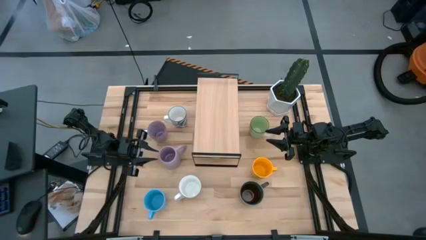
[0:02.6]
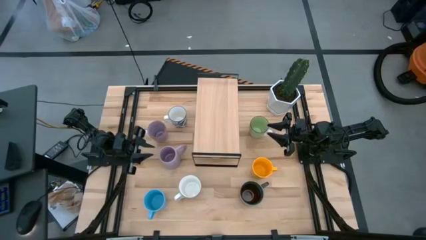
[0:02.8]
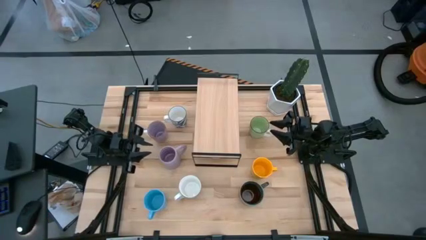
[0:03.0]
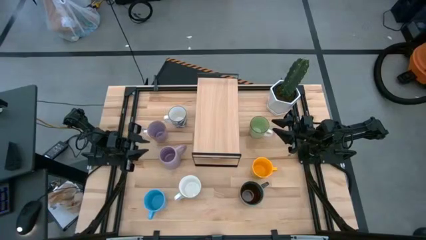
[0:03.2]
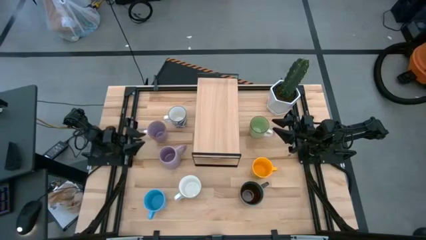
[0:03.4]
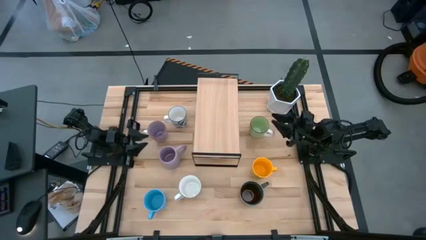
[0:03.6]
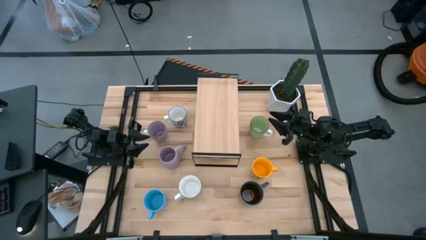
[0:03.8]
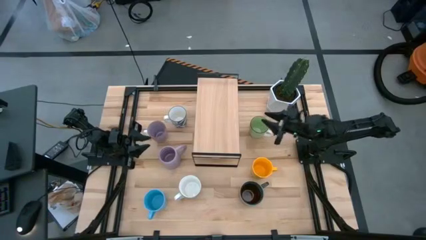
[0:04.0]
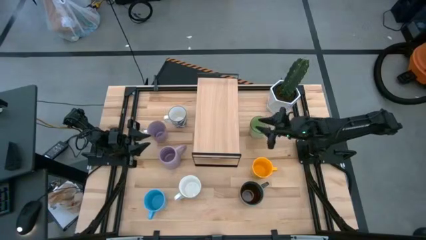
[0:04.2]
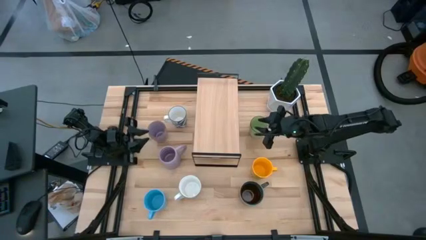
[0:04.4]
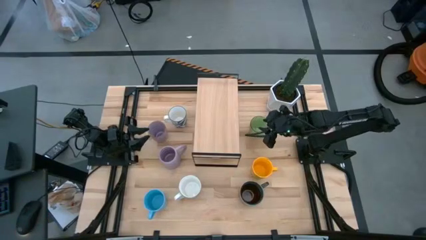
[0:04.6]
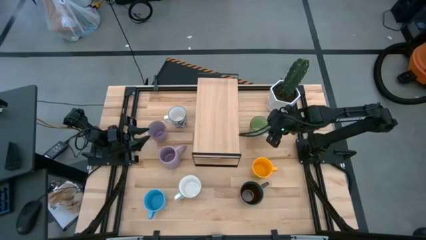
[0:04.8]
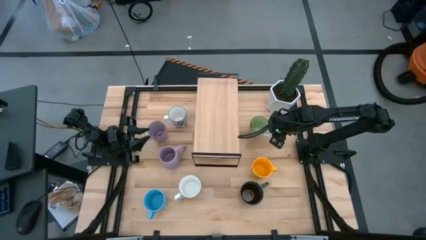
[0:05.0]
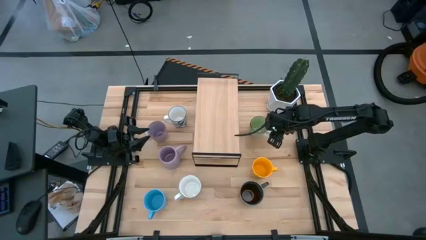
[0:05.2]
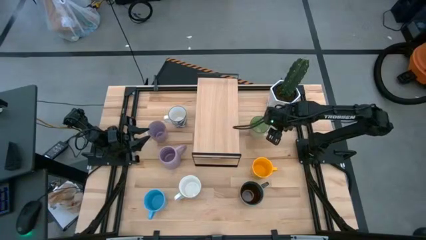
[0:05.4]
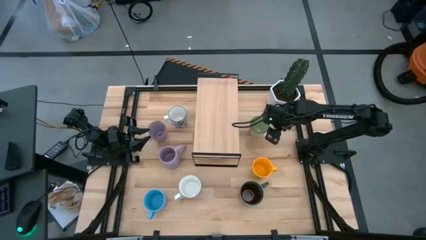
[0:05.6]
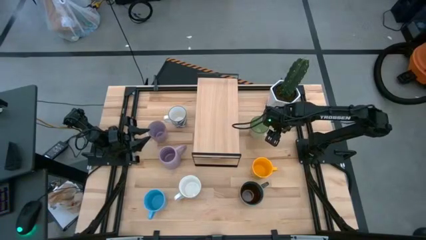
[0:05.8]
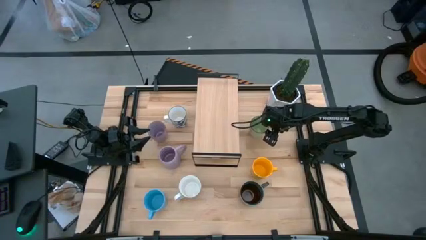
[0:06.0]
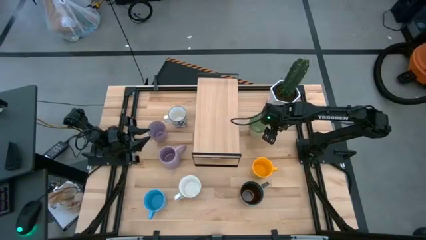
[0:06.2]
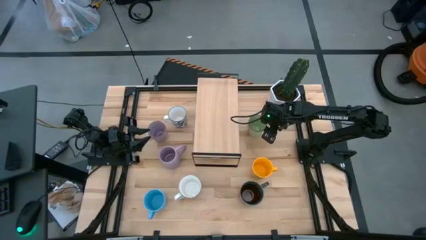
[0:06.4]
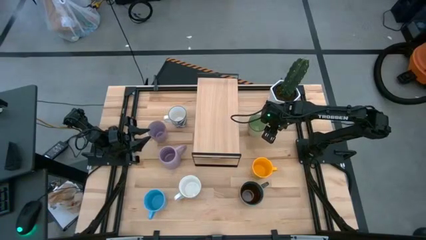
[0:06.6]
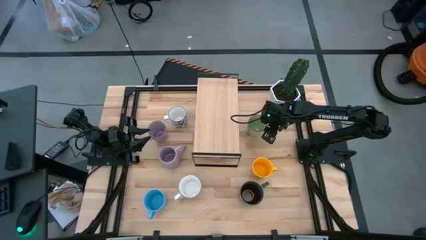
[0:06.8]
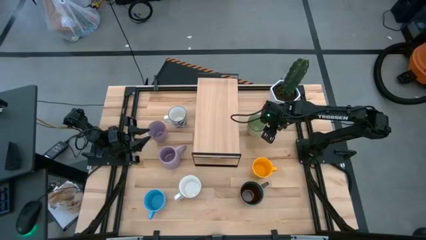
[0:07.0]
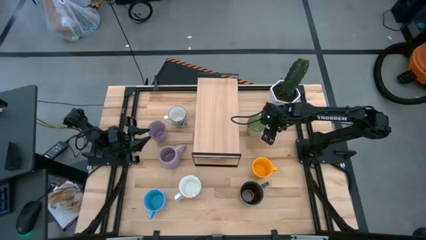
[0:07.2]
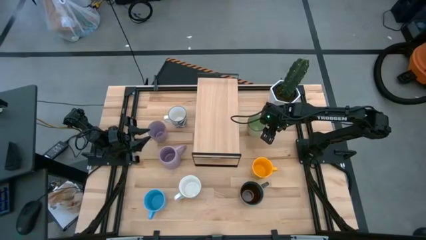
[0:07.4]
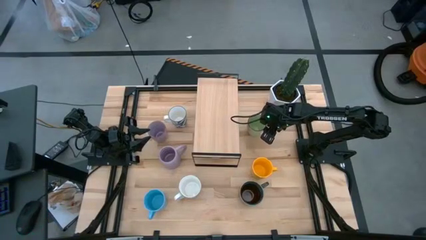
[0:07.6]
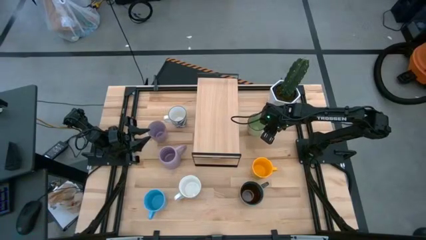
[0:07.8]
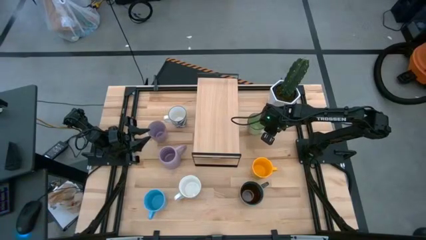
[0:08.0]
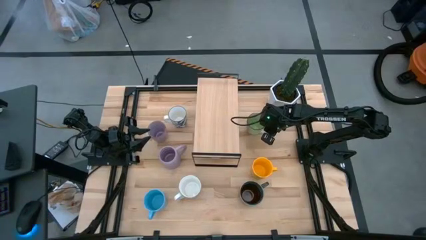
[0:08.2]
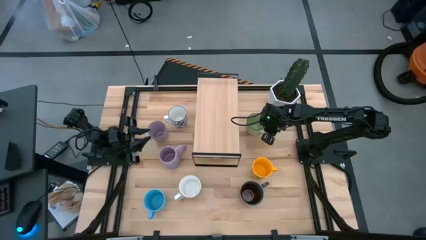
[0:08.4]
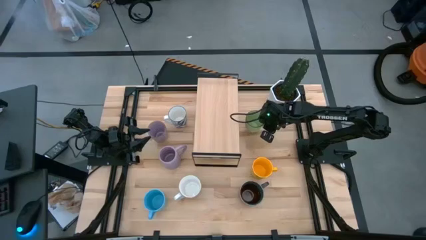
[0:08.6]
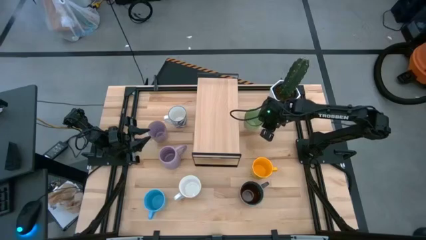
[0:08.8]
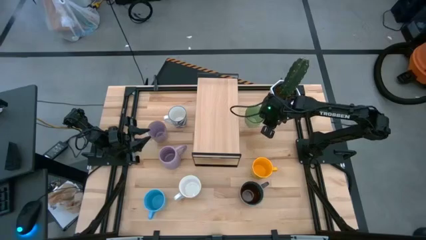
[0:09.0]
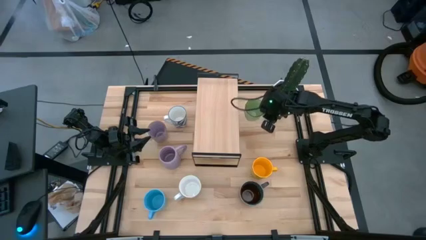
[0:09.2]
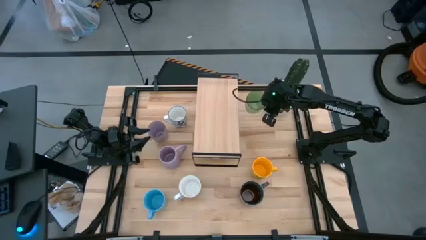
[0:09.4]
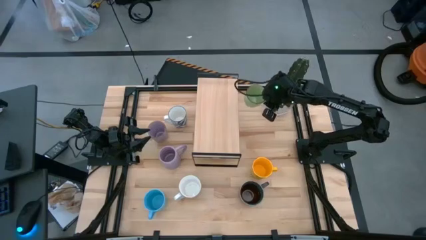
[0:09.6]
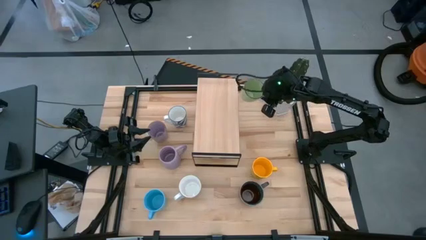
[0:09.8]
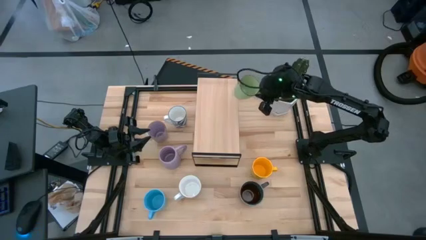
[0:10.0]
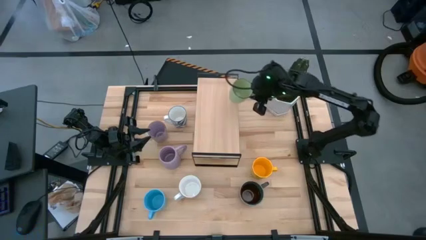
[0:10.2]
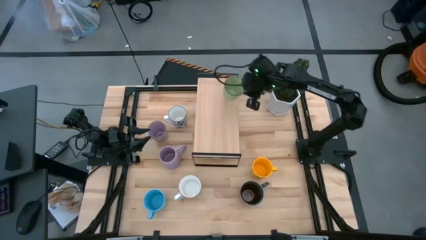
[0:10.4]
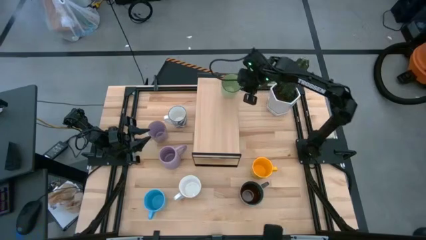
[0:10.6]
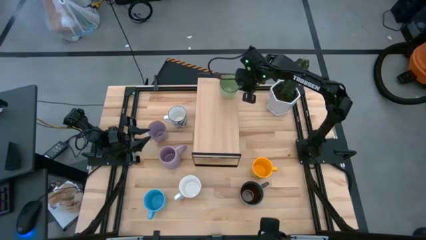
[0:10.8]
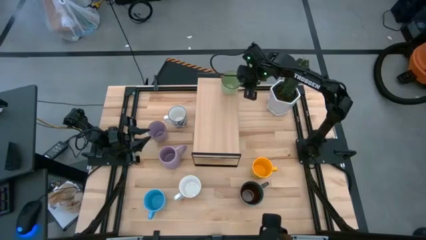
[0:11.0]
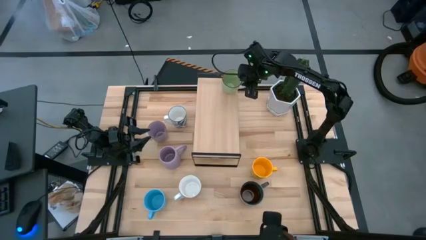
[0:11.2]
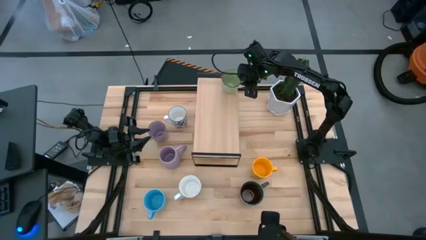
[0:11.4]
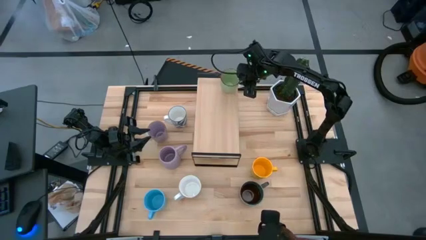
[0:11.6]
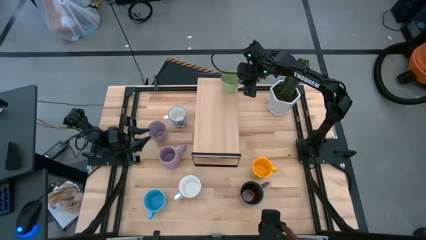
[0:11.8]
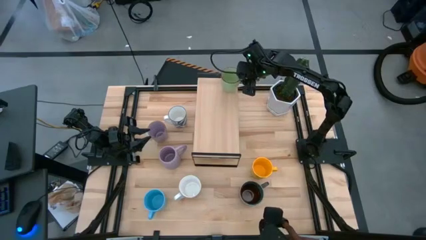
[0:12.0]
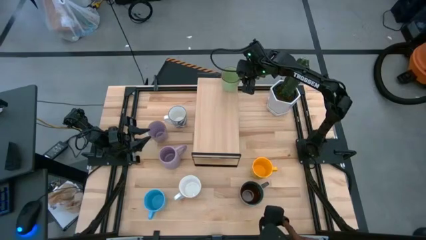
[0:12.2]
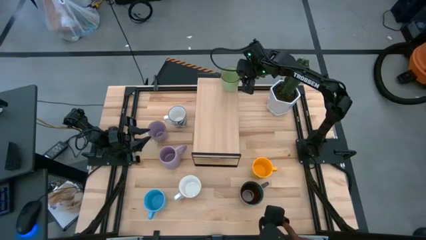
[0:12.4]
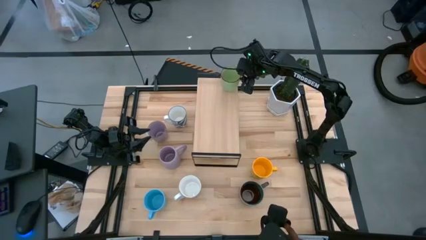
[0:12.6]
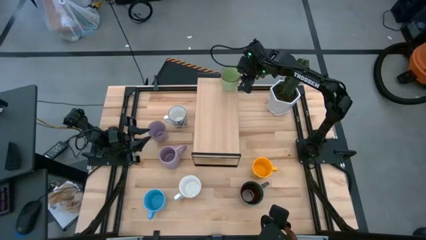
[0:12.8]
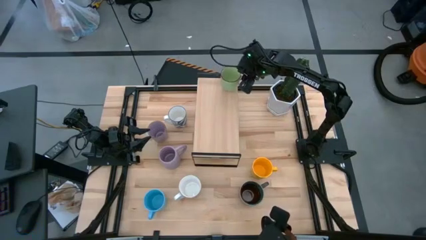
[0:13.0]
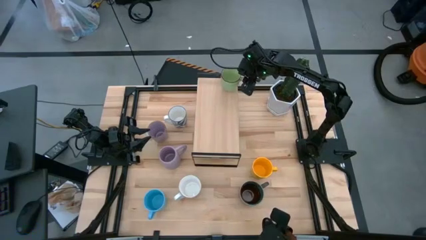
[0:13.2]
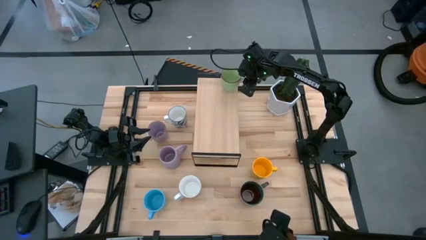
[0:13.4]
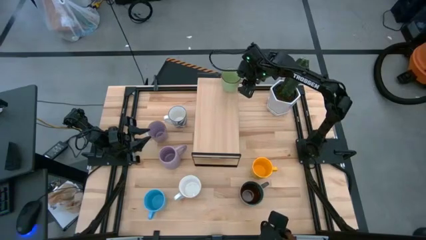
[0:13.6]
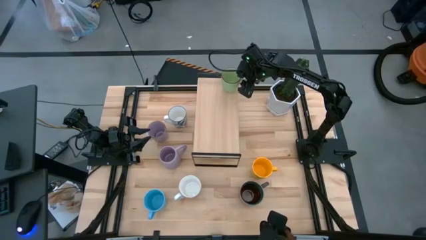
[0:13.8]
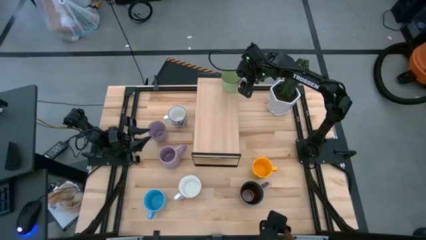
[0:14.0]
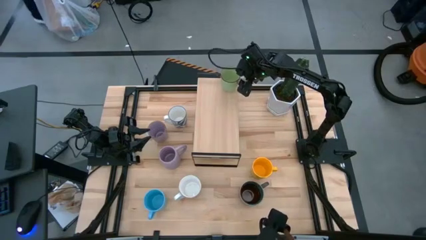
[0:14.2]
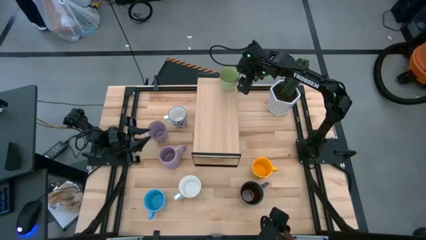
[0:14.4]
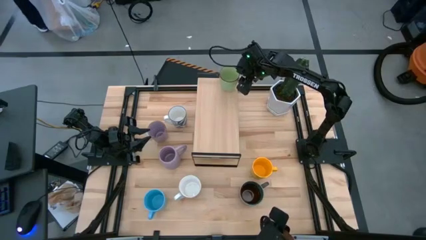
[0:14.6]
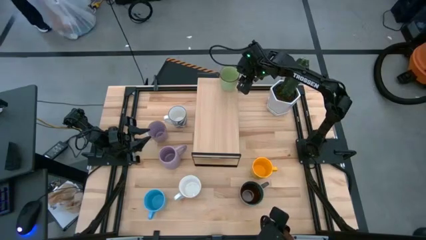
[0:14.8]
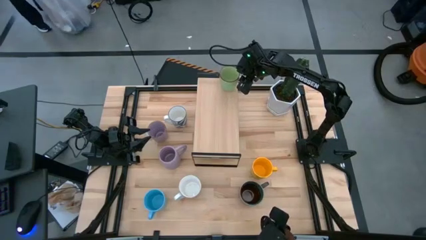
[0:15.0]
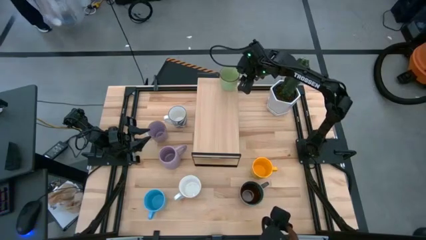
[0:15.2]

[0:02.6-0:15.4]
Task: Place coffee mugs
Put the green mug on the shelf

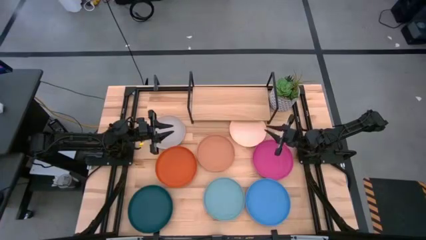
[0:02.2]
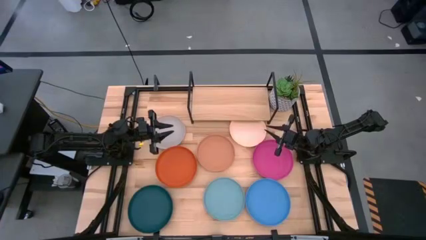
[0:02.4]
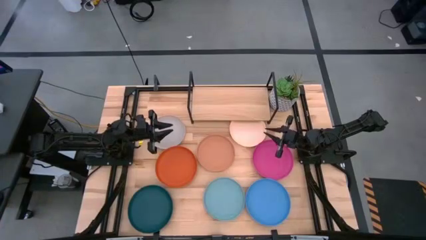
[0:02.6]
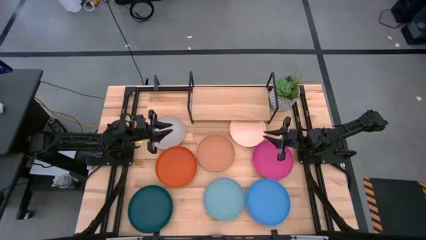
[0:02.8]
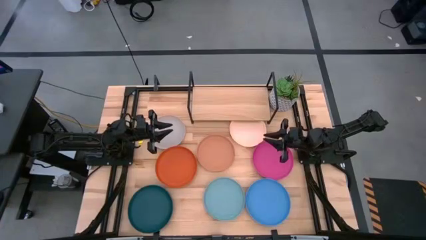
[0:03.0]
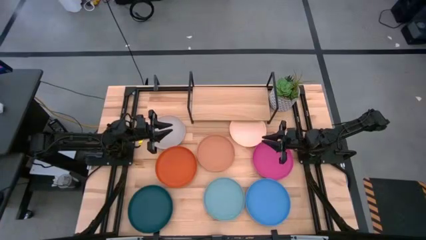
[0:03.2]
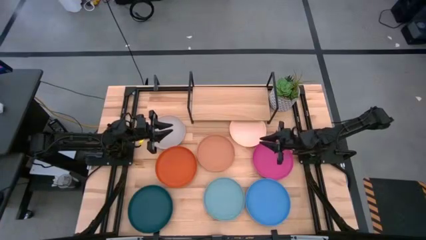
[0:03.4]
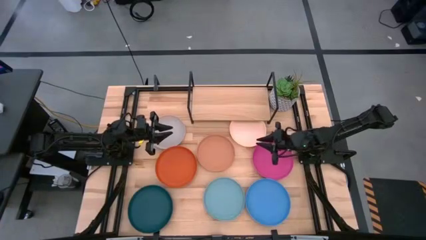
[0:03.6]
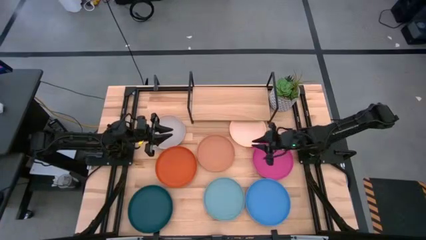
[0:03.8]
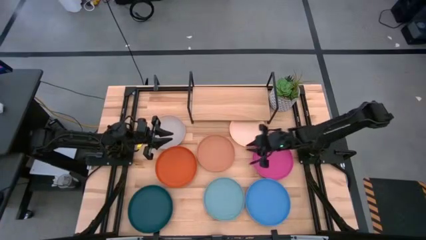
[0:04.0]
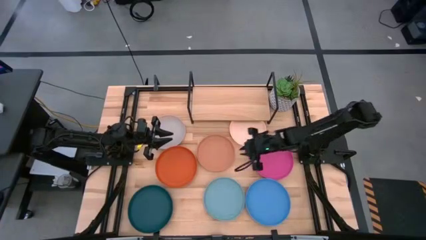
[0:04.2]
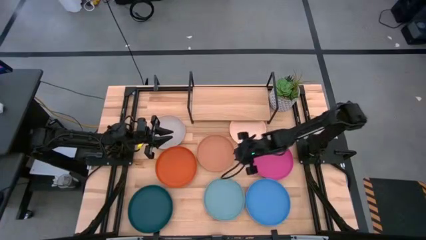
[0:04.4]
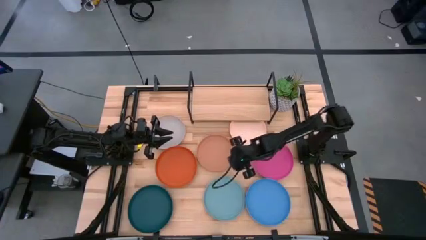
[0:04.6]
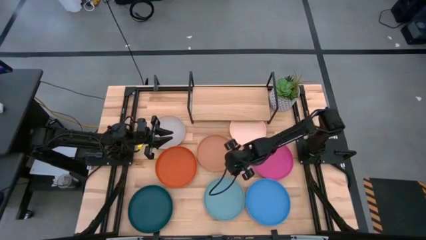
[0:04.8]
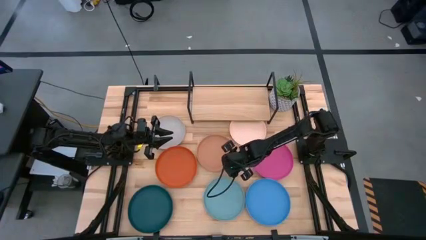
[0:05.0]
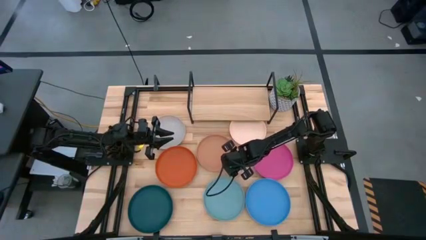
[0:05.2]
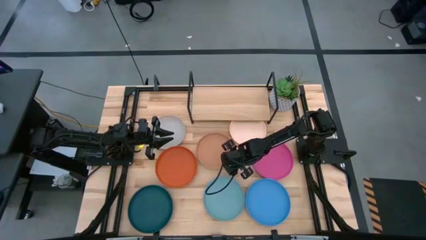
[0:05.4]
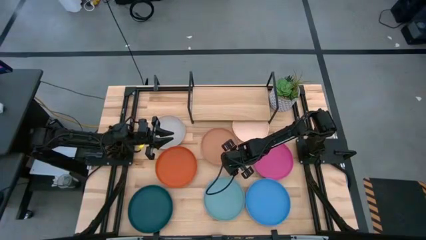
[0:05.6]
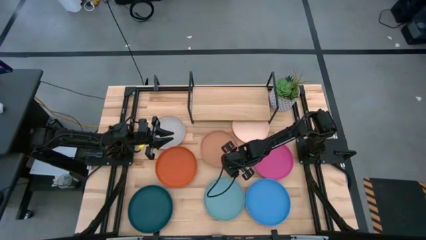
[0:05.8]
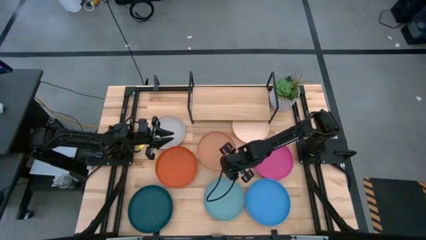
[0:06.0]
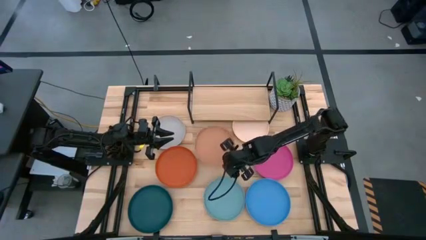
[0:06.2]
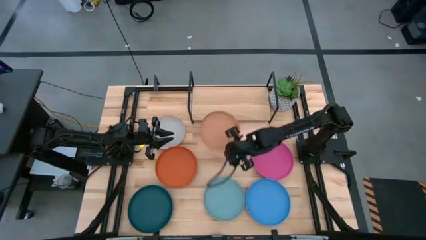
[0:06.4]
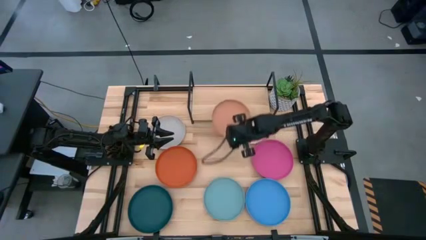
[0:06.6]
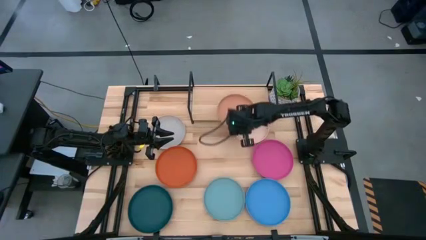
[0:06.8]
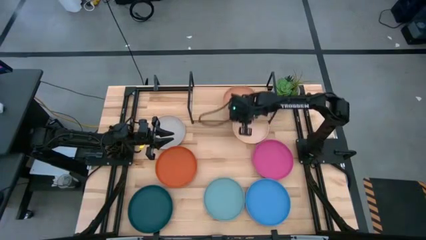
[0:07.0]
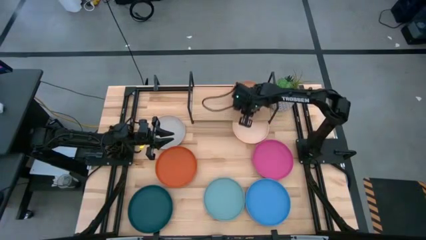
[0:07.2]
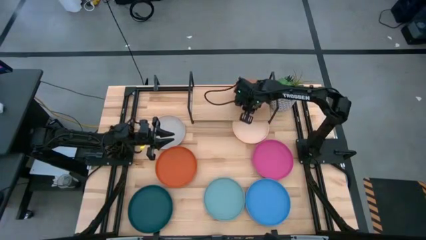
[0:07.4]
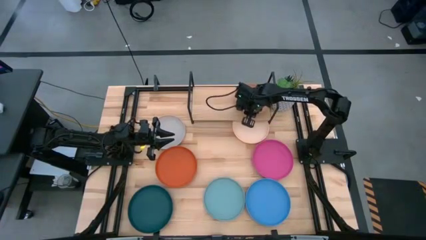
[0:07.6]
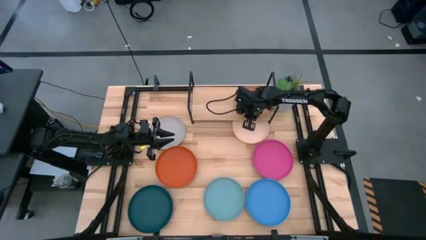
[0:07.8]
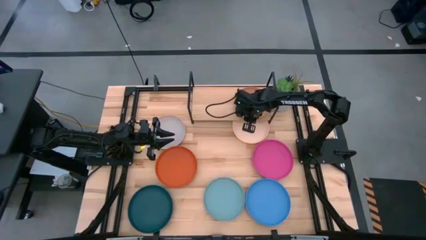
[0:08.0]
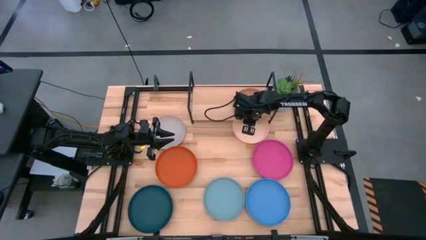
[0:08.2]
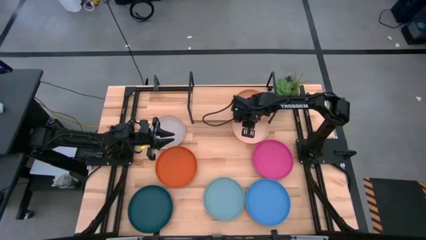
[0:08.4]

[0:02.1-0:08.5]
Task: Place and stack plates onto a shelf
Put the brown plate on the shelf
